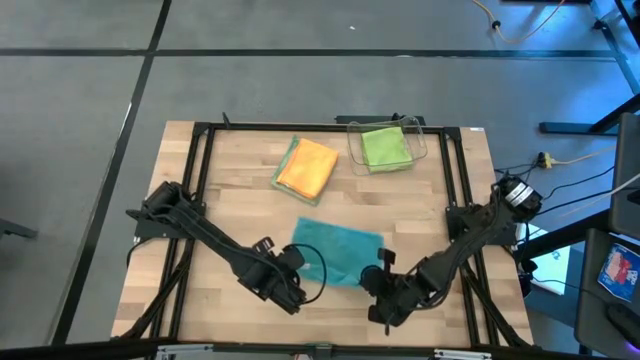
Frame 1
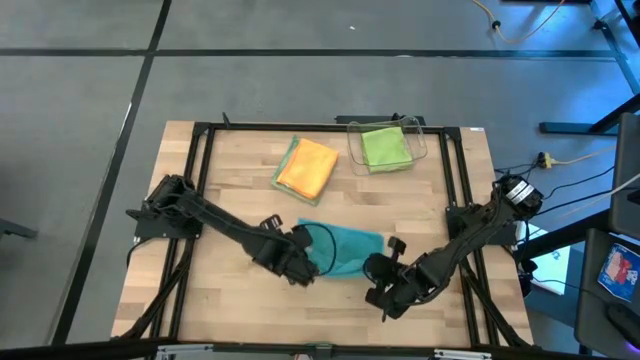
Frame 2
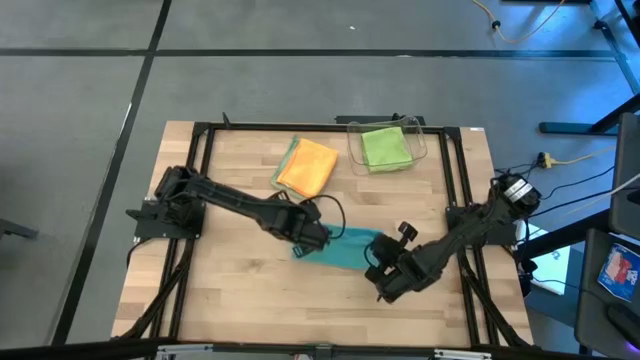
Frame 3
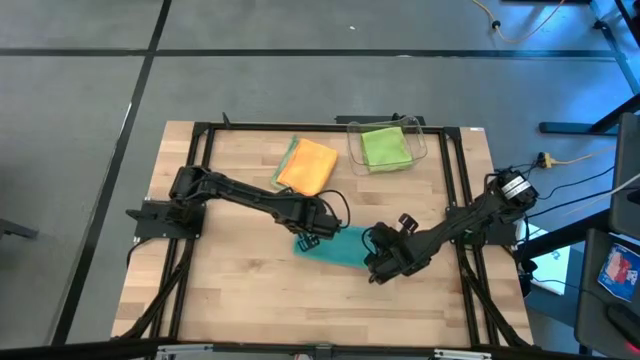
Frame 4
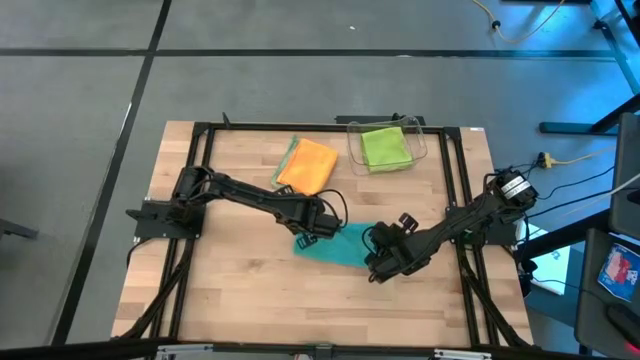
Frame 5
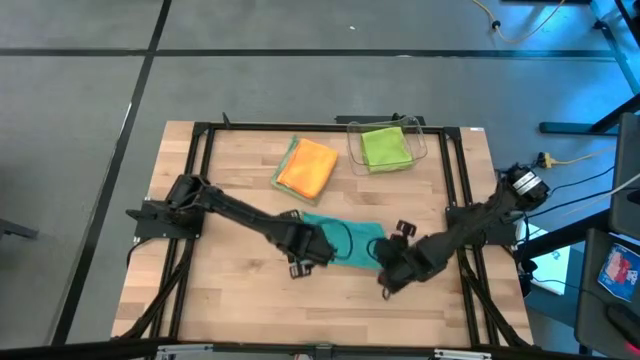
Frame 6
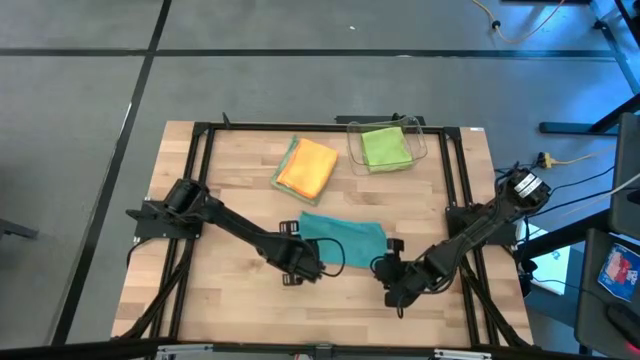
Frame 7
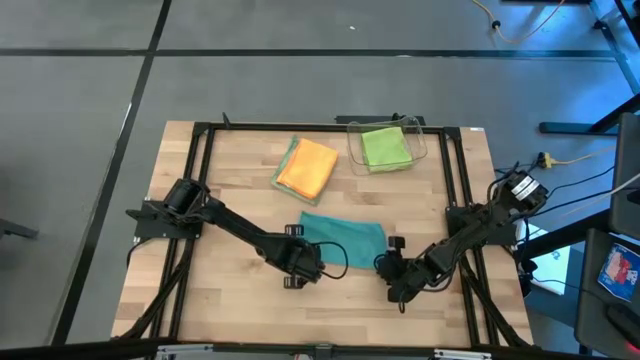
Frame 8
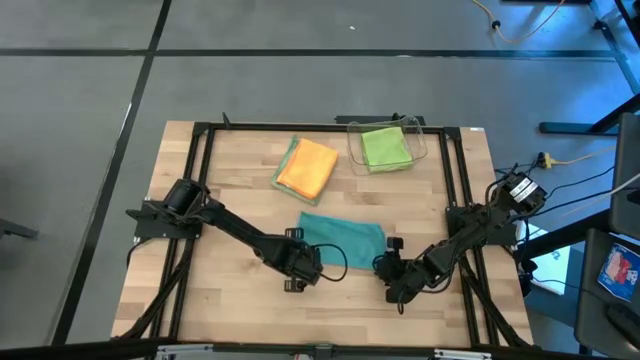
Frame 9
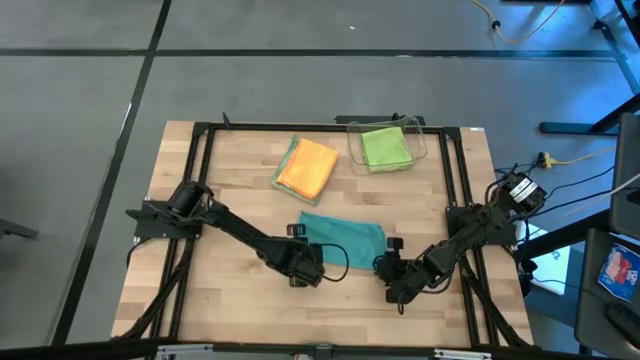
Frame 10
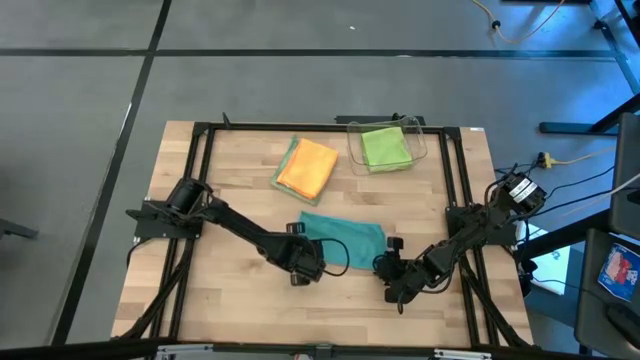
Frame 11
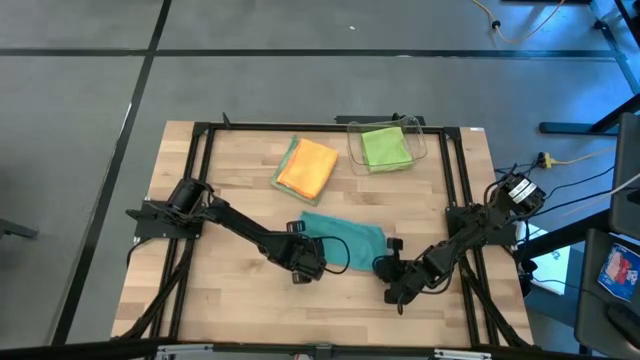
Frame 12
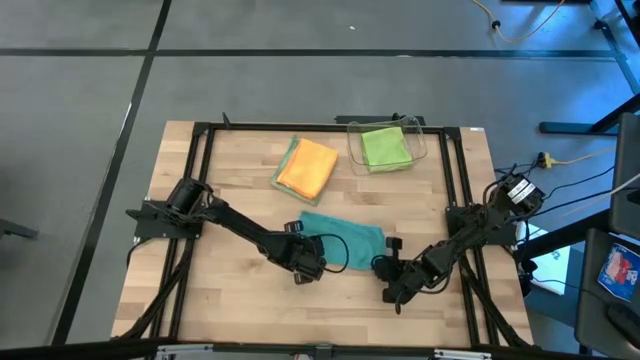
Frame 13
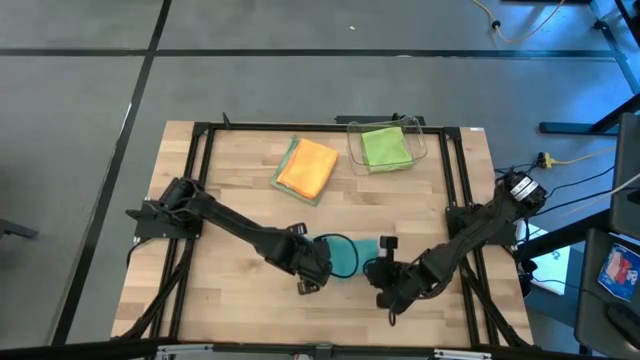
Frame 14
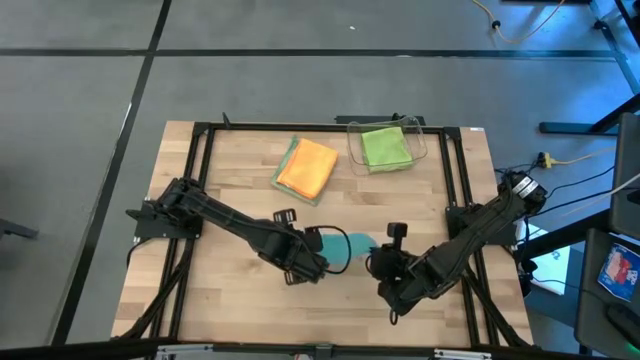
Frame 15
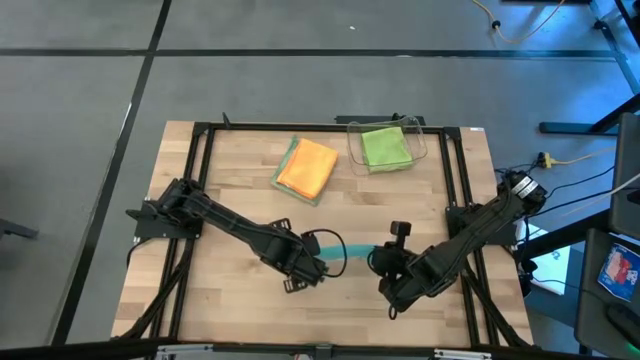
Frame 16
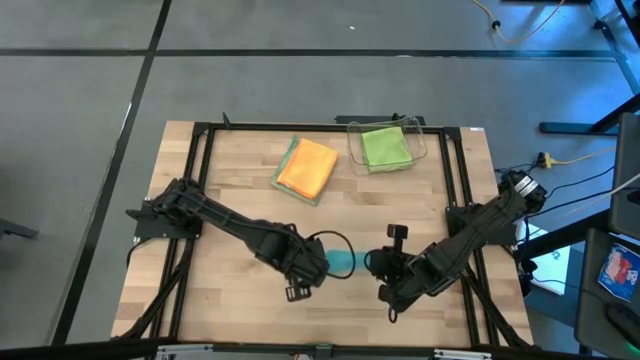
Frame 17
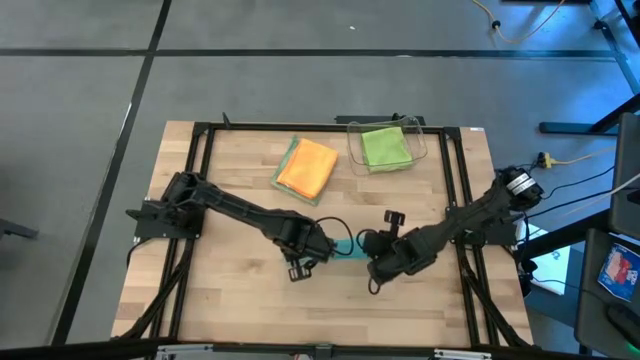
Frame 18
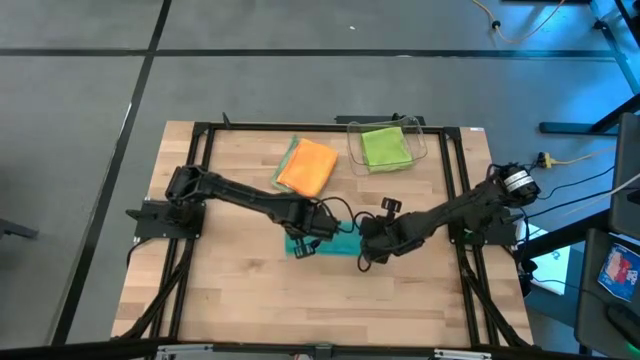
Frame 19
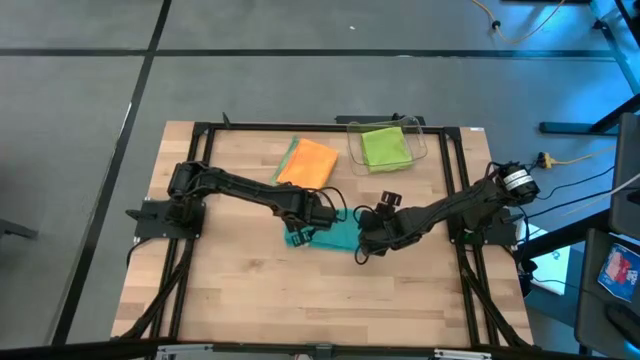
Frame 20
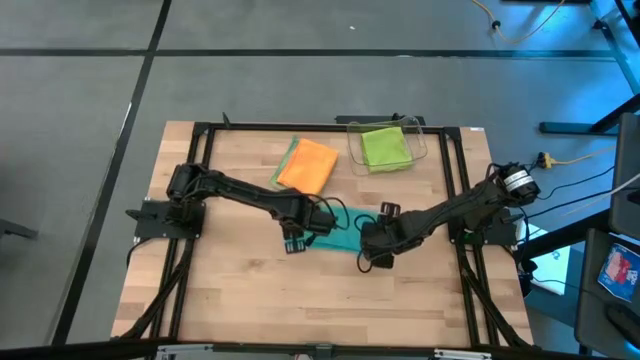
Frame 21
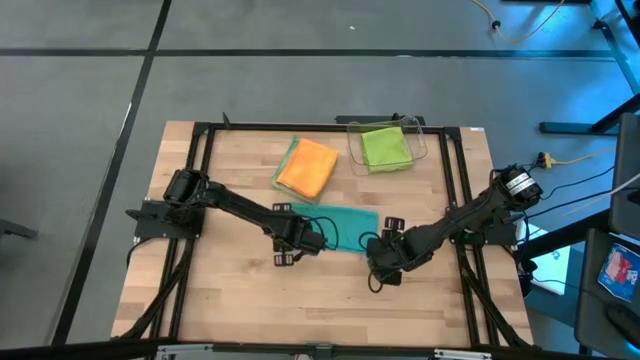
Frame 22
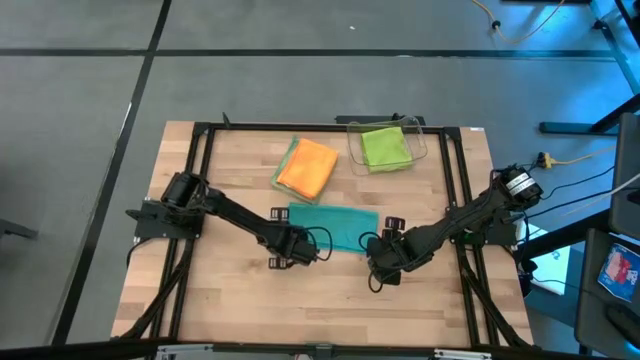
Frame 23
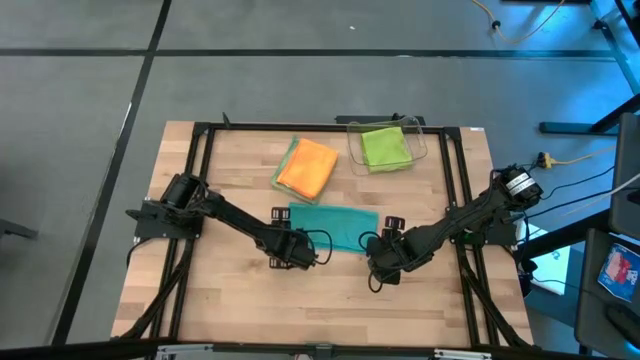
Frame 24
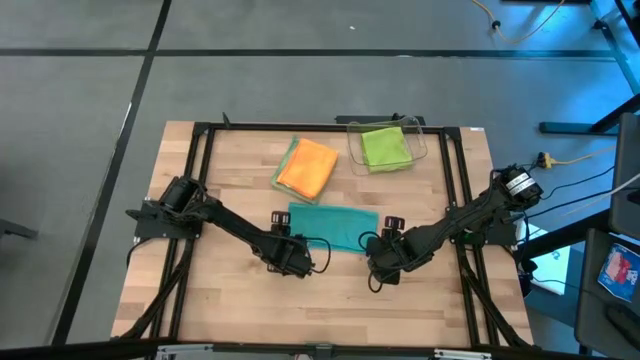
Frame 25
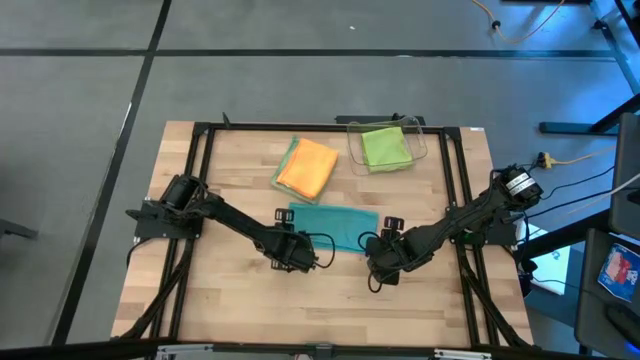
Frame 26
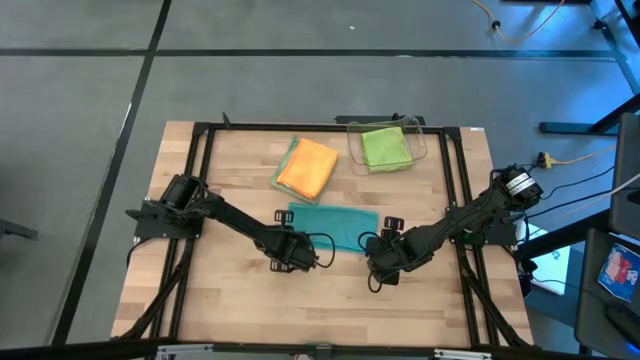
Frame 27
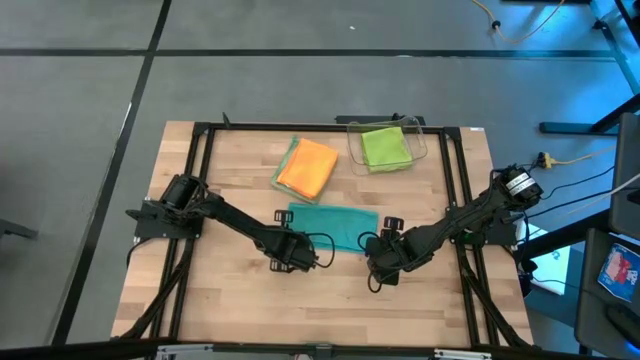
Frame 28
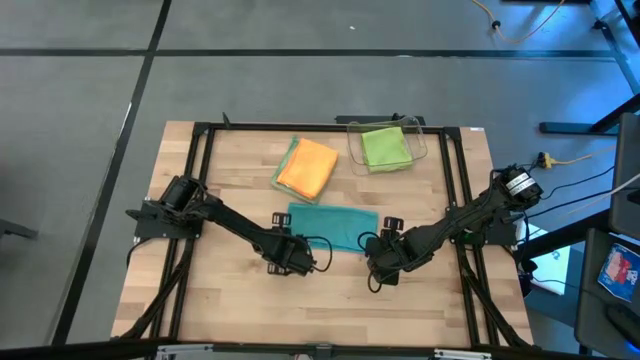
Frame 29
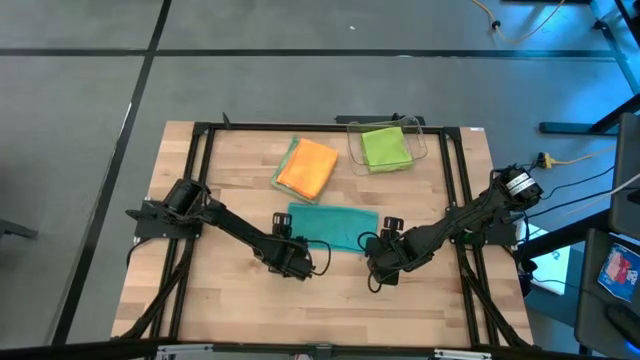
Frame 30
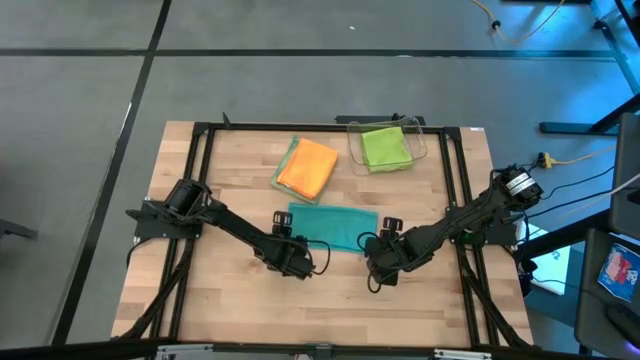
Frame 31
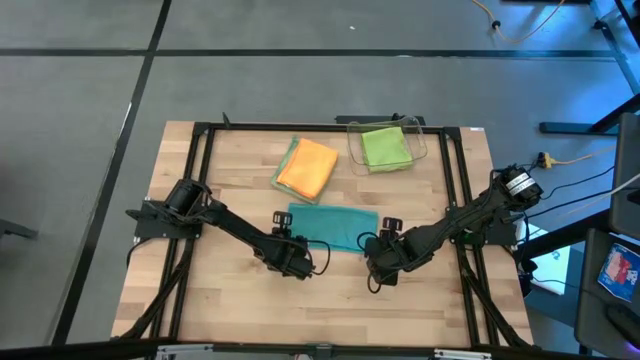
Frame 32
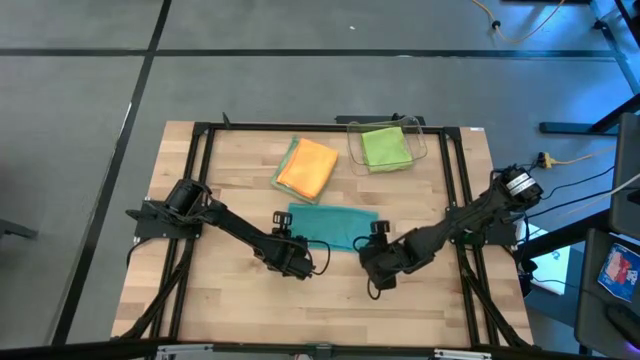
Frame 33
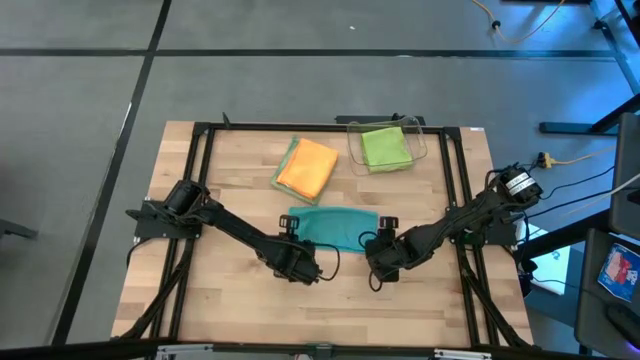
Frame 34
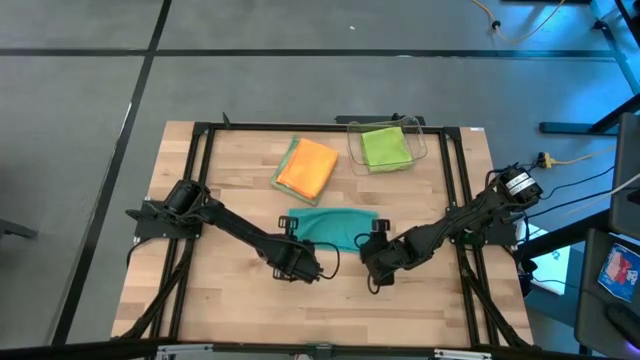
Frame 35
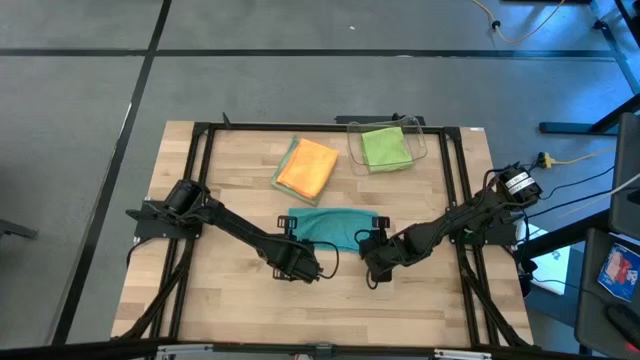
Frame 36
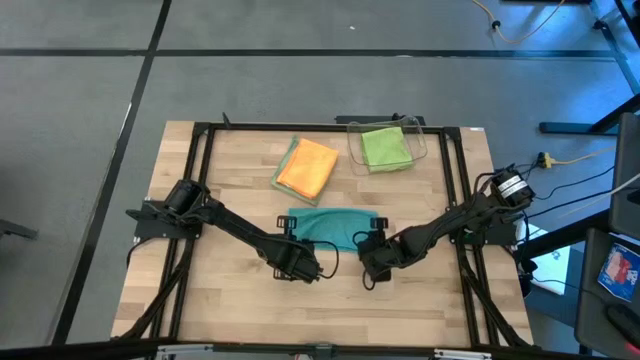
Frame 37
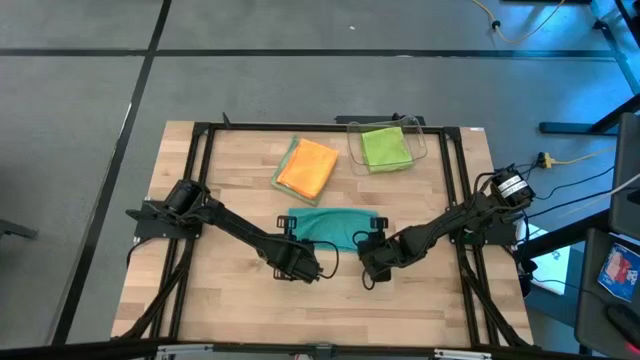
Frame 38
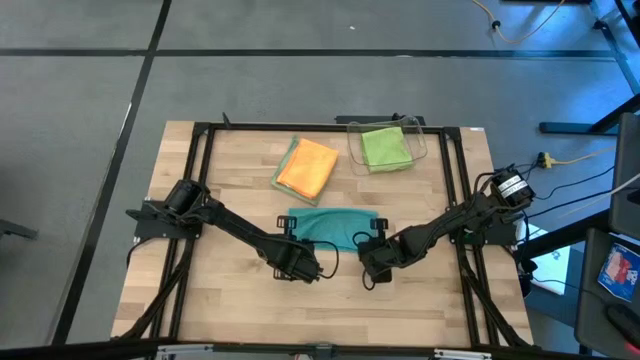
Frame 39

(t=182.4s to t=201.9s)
Task: Fold microfiber towels
Fold the blue microfiber towel
